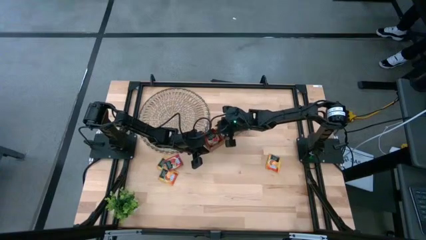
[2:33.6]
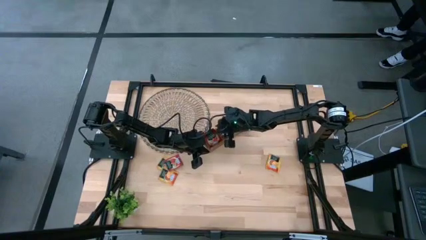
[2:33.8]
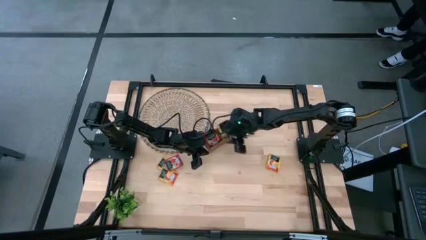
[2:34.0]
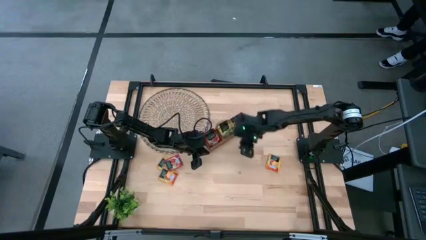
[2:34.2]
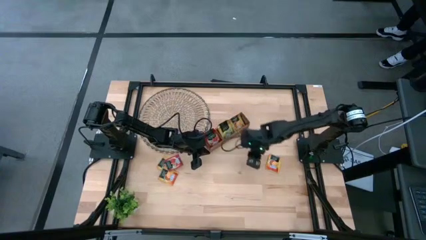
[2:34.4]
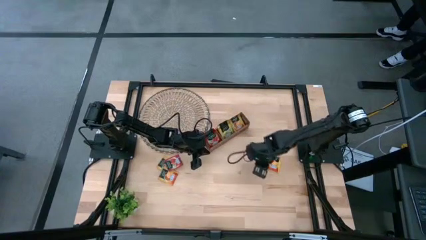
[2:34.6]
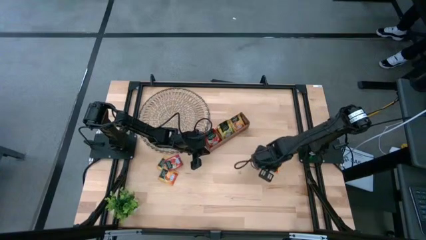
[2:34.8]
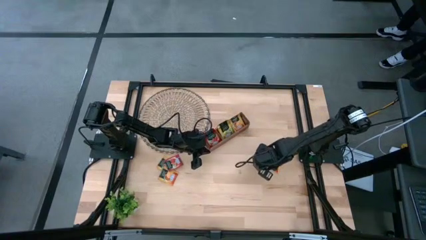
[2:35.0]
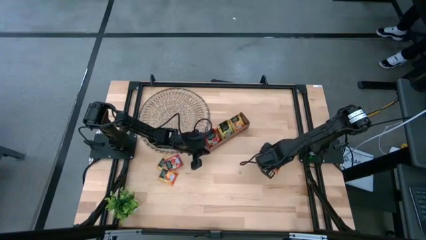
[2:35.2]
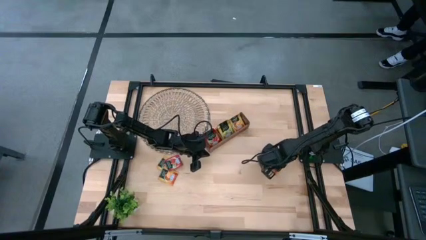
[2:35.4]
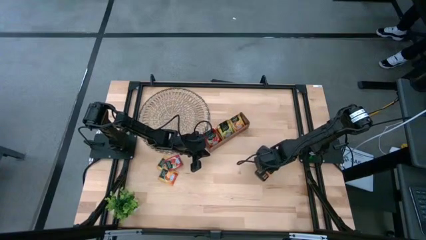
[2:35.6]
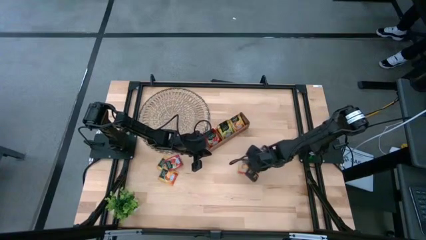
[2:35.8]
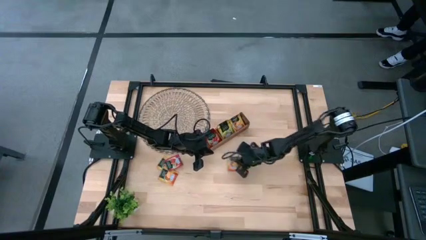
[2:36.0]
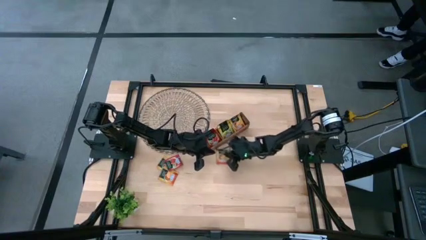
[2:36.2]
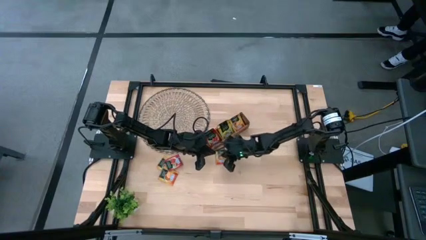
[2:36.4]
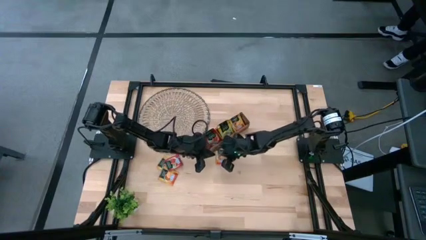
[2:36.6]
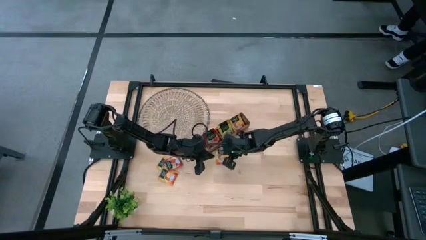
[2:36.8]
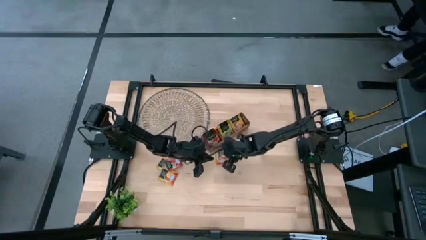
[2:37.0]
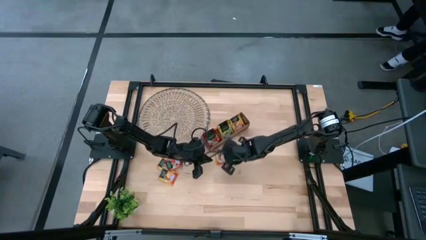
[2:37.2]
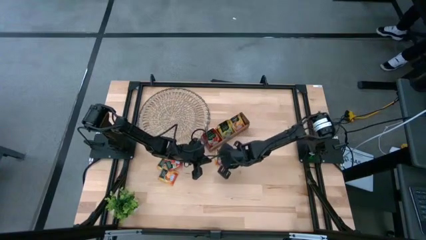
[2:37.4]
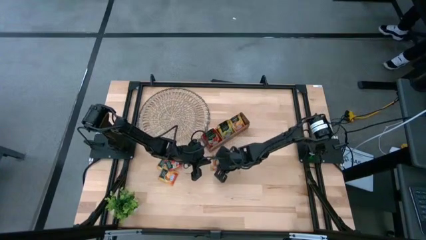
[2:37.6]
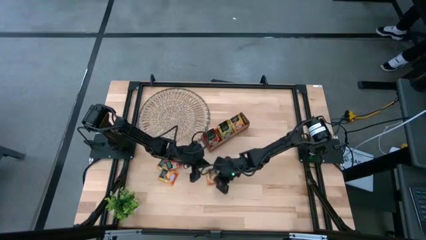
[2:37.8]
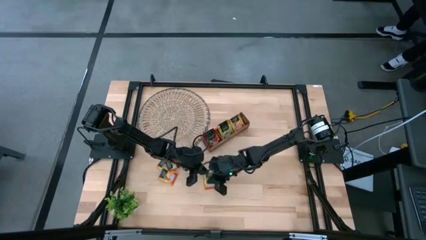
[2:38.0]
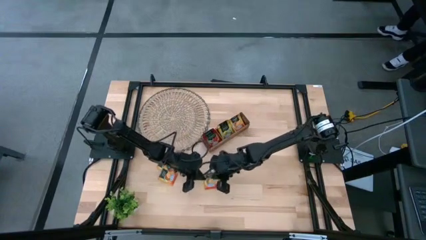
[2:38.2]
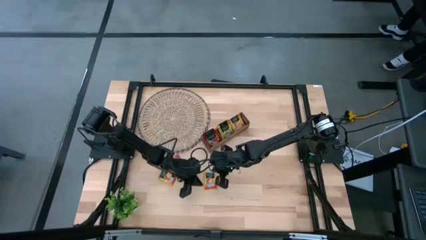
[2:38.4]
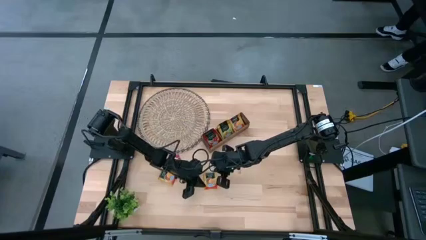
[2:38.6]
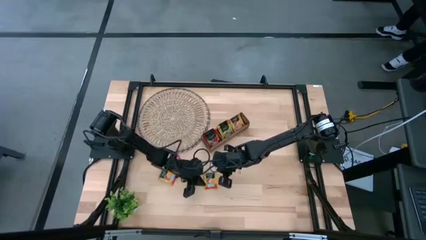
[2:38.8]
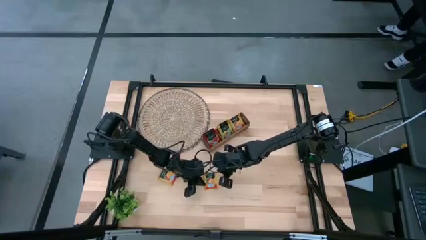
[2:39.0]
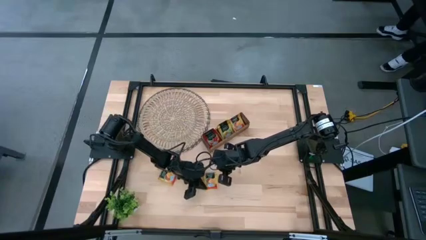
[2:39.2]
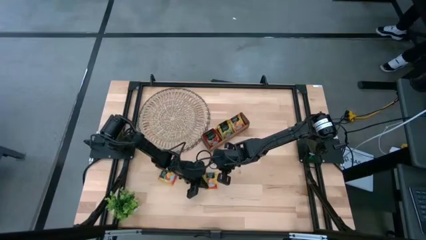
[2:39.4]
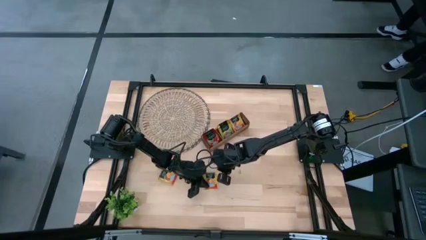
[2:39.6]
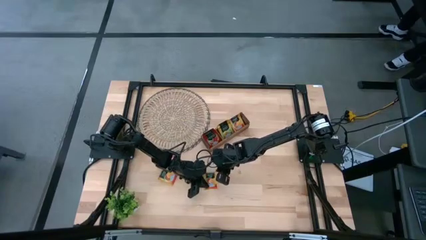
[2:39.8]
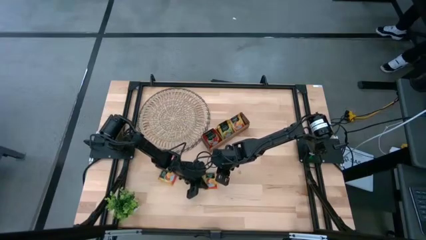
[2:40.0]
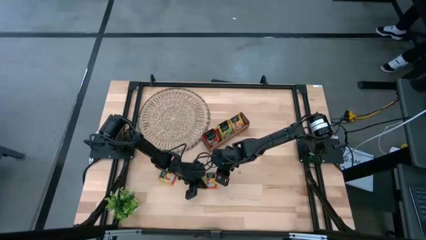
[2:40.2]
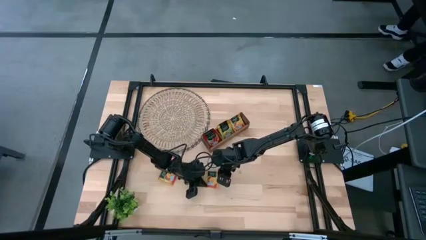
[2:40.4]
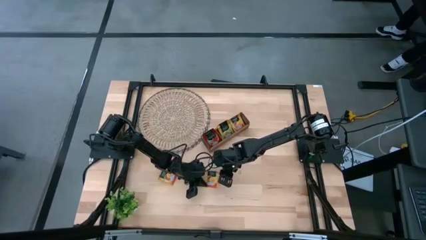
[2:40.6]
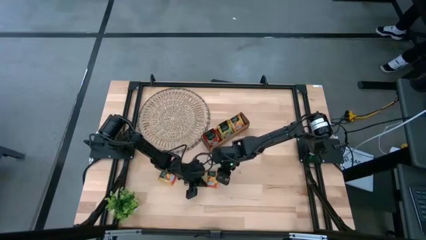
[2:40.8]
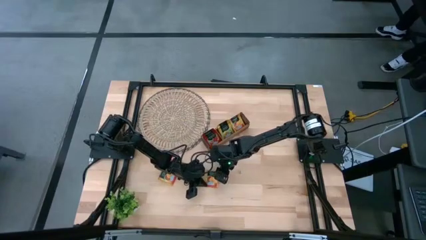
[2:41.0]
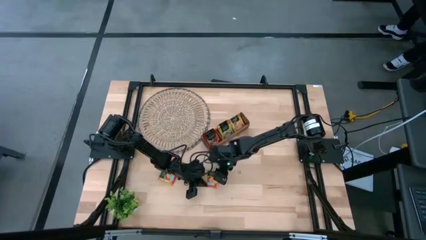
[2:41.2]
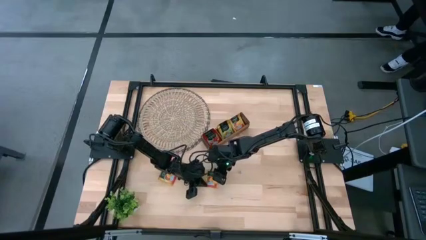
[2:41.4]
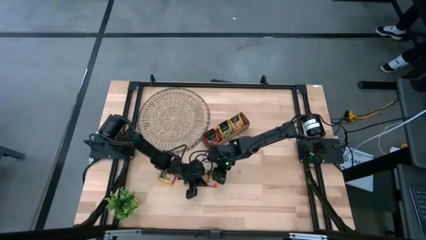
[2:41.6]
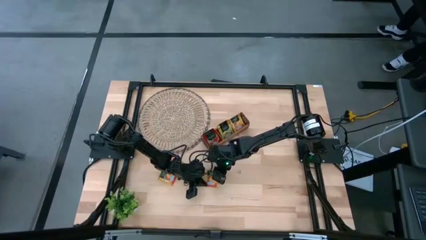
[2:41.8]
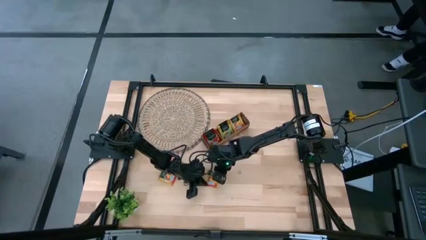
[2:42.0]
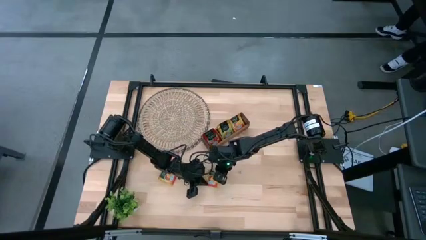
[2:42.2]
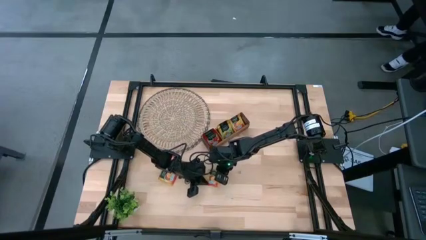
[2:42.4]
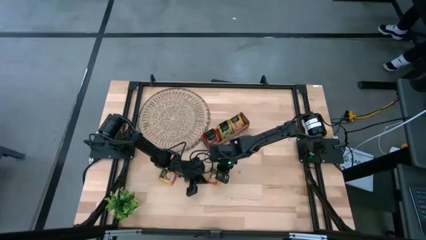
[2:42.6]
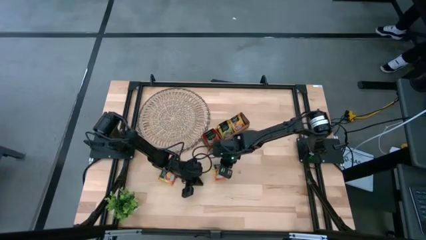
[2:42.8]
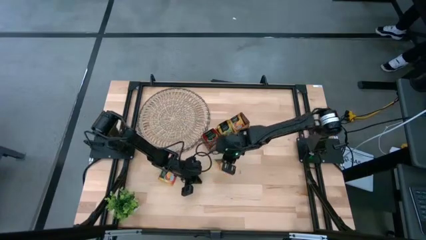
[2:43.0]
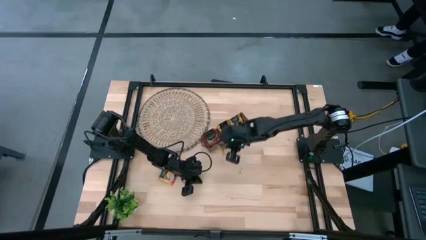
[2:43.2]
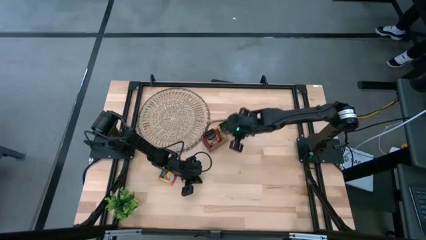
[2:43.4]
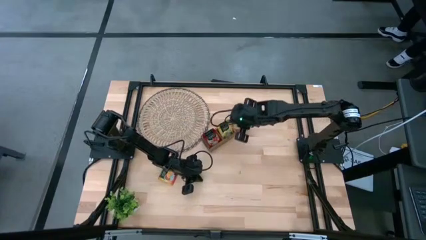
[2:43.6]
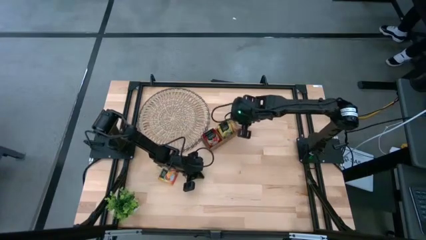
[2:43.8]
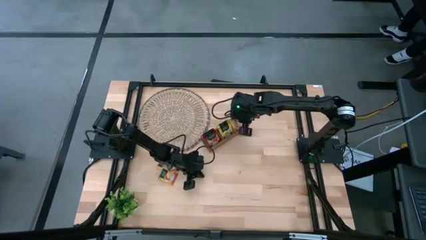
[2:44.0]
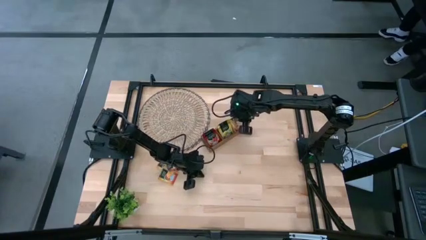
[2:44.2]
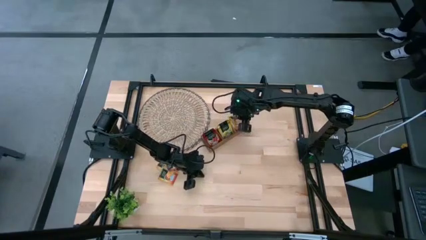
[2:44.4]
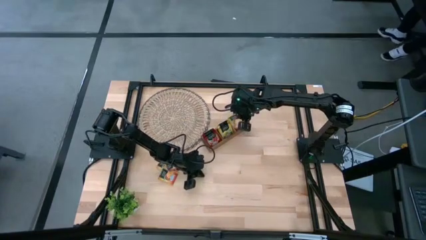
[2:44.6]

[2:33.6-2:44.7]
Task: Pick & Place Tea
Put the orange tea bag into the right section of the wooden organizer

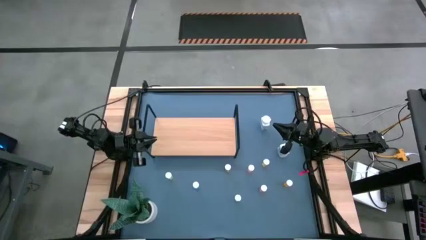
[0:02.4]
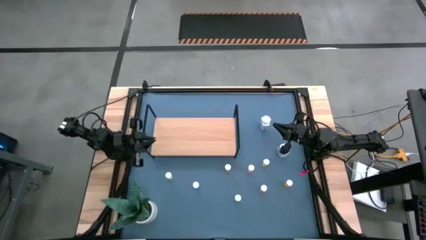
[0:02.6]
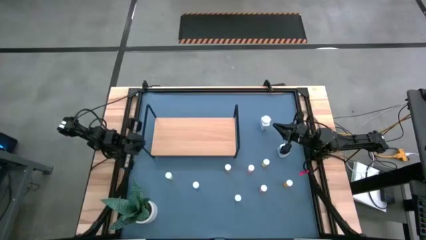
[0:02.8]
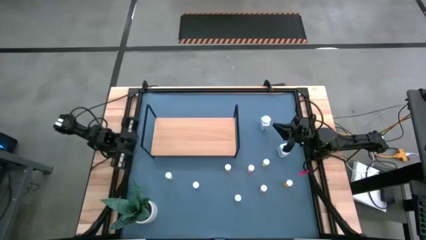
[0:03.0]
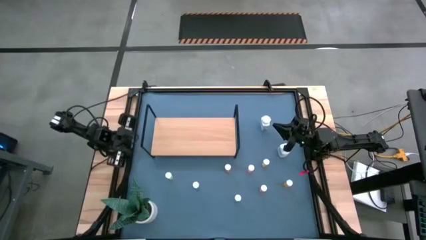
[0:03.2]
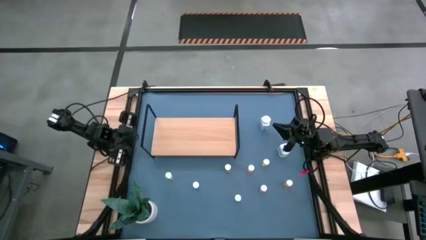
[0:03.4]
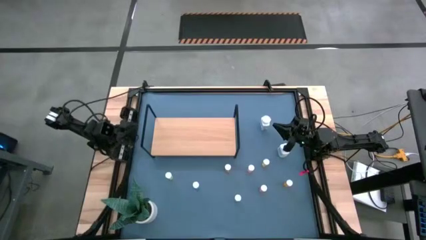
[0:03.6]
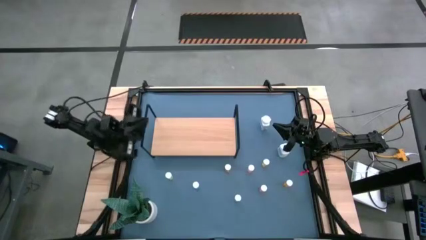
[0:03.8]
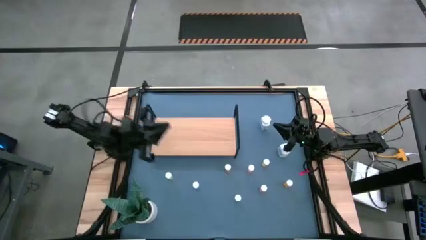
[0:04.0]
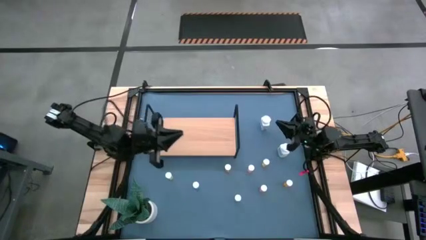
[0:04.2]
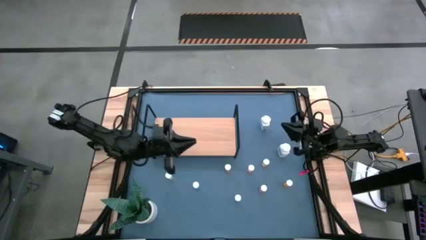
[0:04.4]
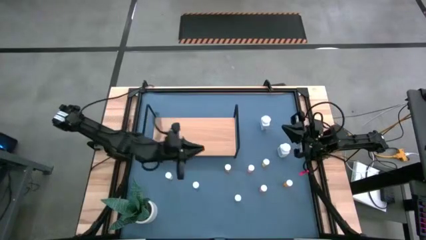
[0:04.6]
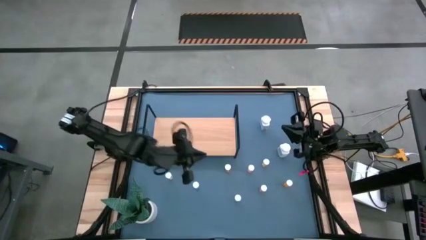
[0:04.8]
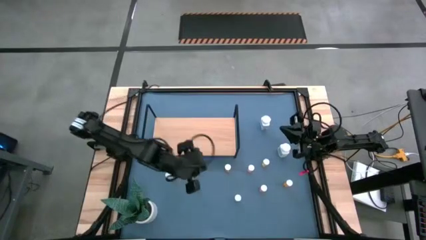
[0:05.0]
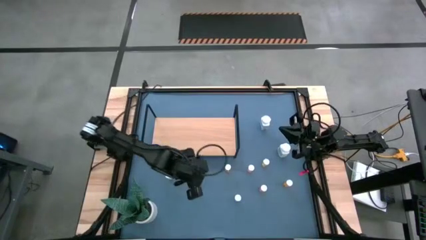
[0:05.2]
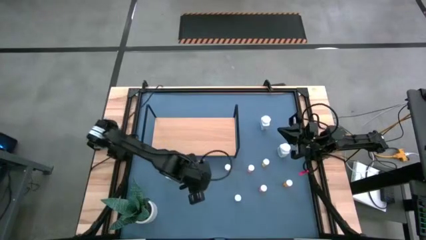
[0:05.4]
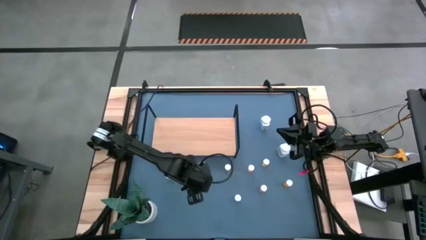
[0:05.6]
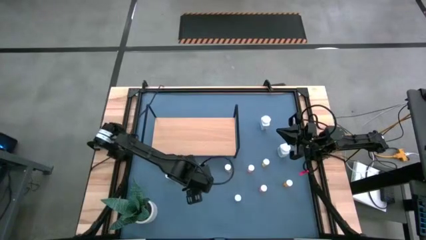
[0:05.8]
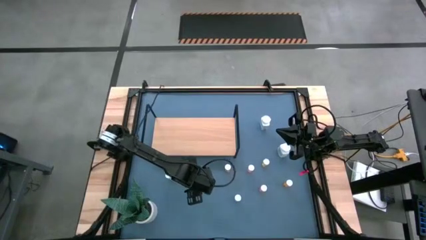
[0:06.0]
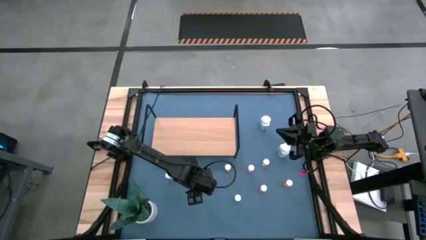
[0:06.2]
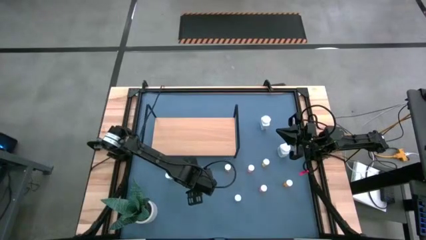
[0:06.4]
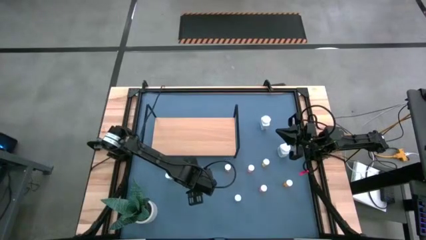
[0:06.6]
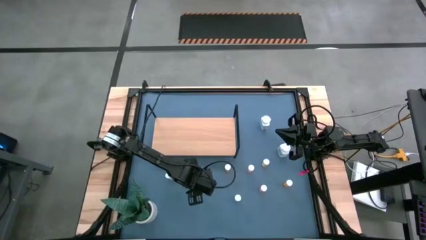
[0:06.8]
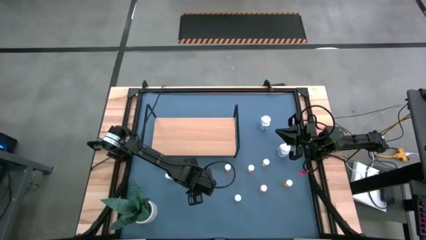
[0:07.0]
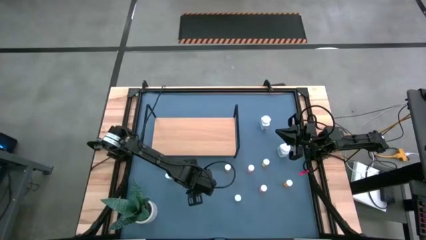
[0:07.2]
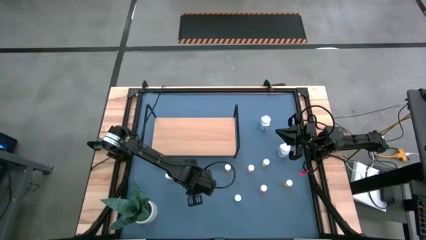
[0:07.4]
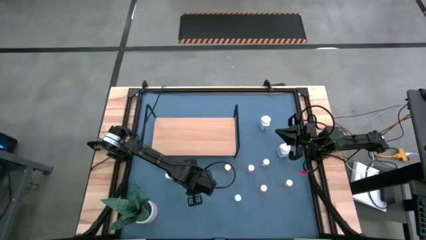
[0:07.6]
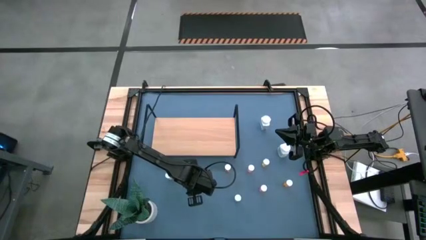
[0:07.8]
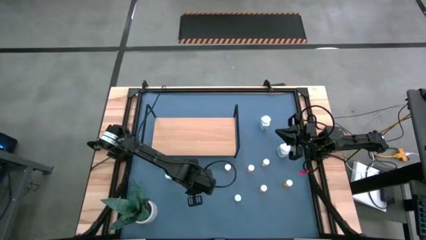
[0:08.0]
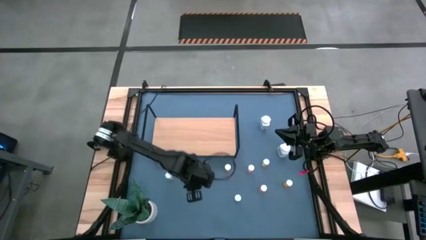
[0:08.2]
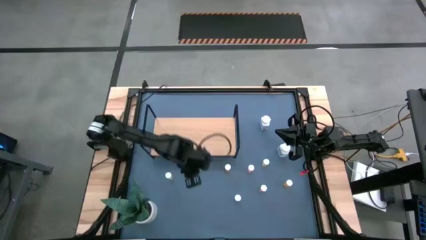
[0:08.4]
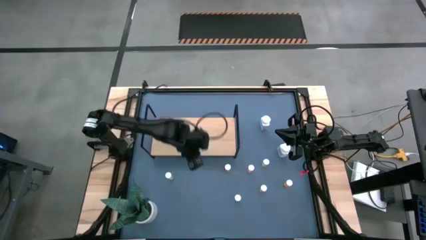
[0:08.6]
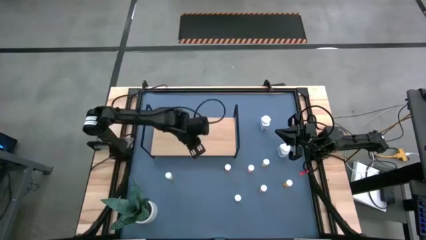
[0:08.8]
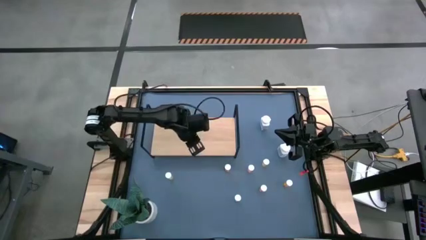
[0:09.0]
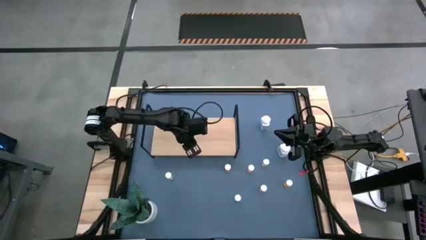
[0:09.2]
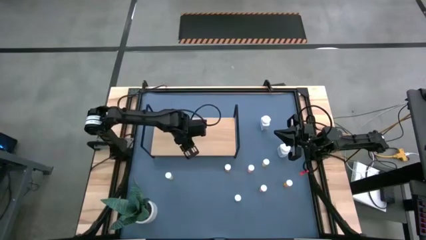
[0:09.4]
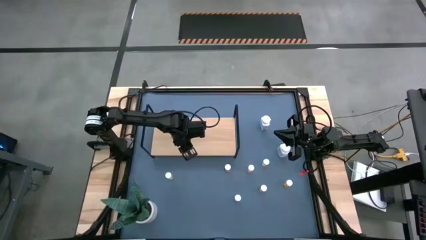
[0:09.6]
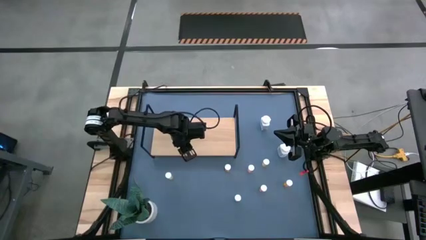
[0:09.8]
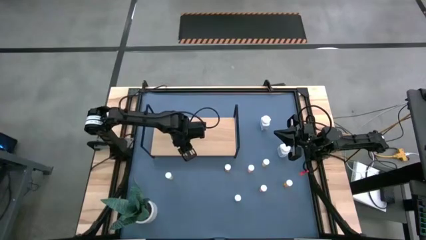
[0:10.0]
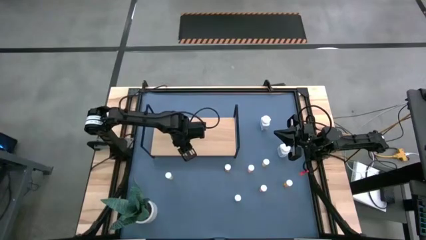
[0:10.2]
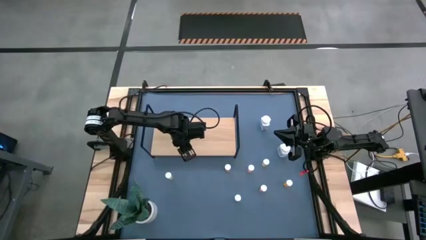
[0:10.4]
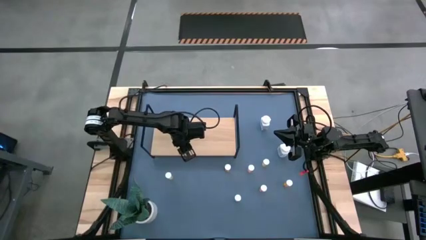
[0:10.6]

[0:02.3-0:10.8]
Task: Pick and place medicine bottles onto shelf by color
Put the blue pill bottle on the shelf
